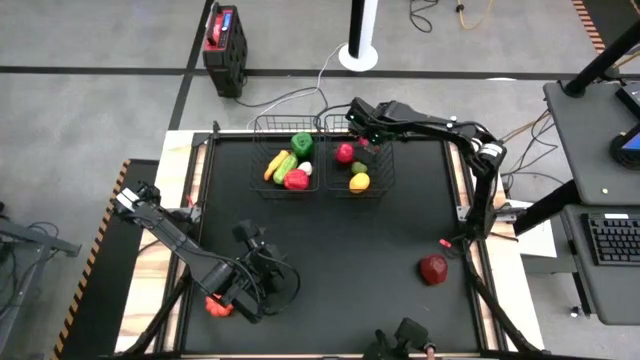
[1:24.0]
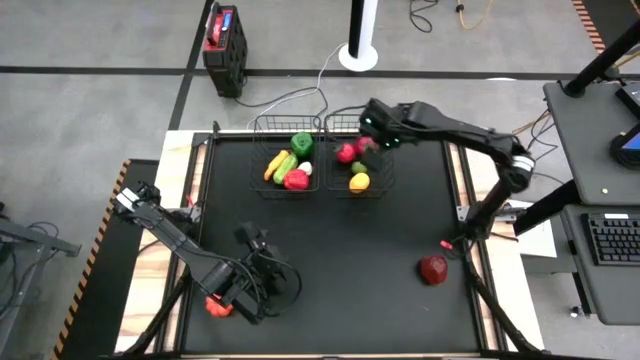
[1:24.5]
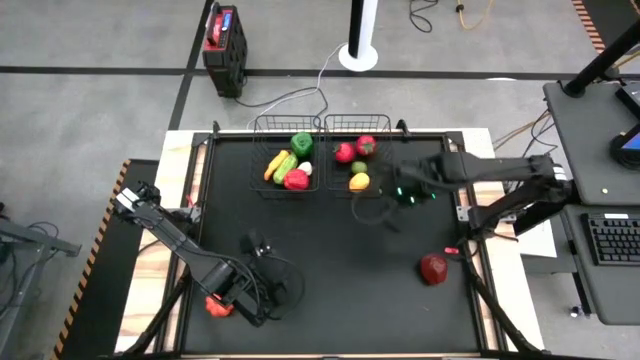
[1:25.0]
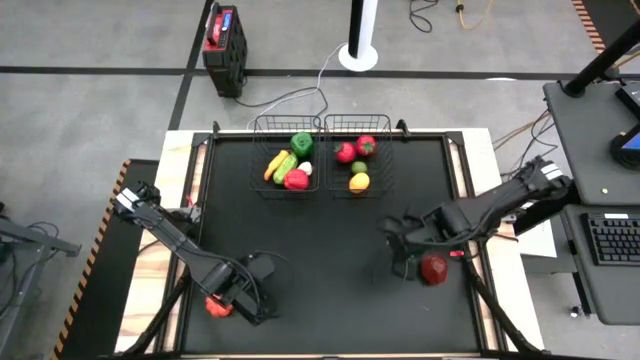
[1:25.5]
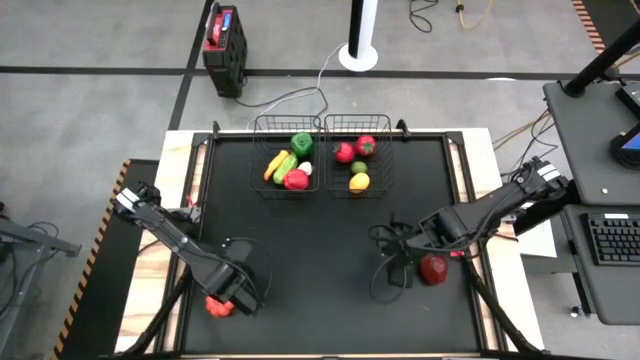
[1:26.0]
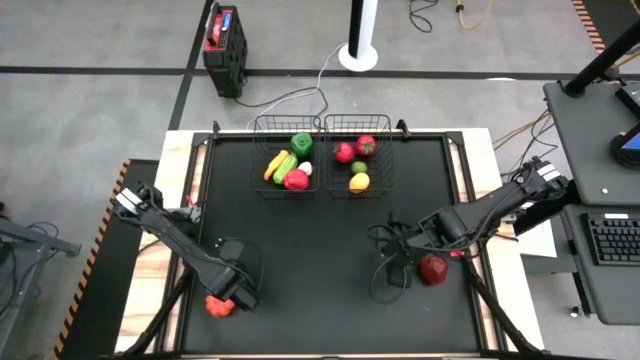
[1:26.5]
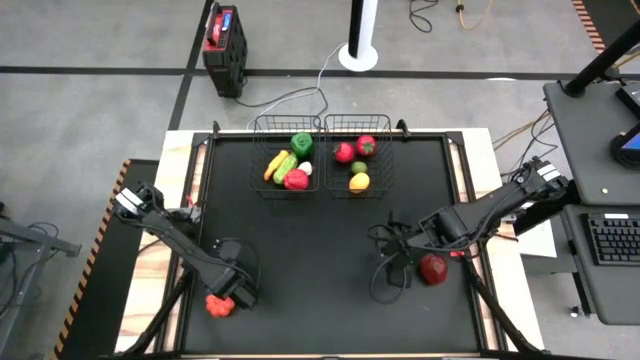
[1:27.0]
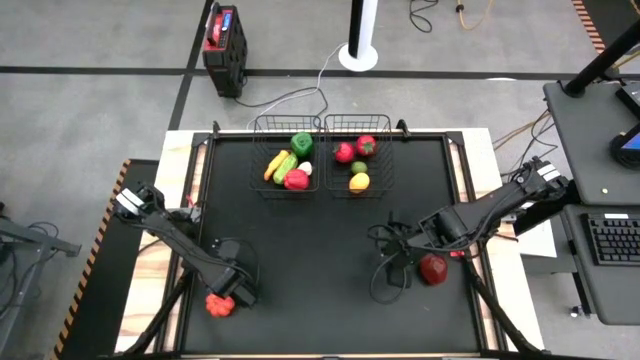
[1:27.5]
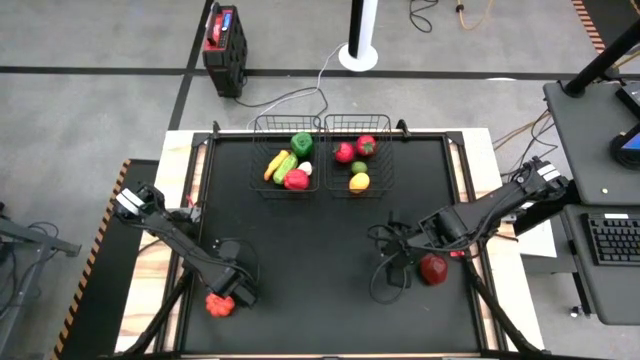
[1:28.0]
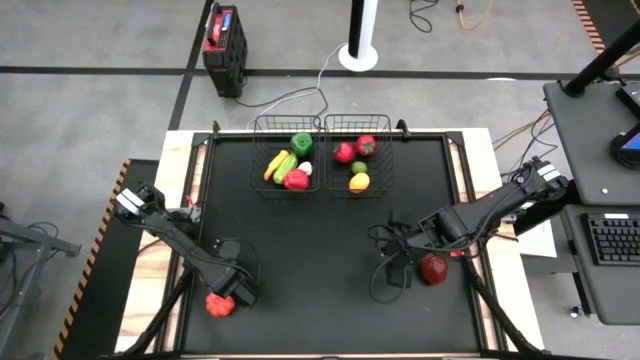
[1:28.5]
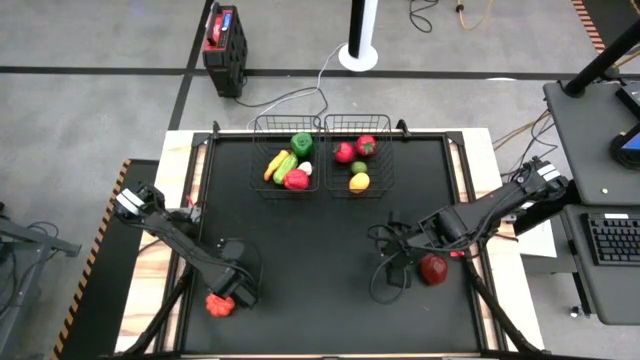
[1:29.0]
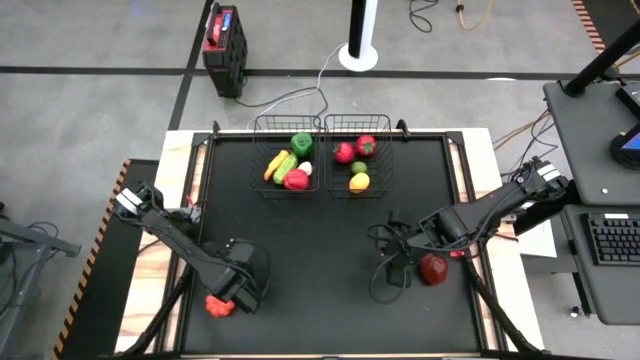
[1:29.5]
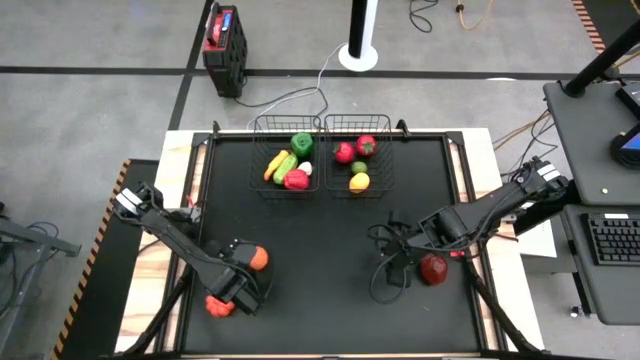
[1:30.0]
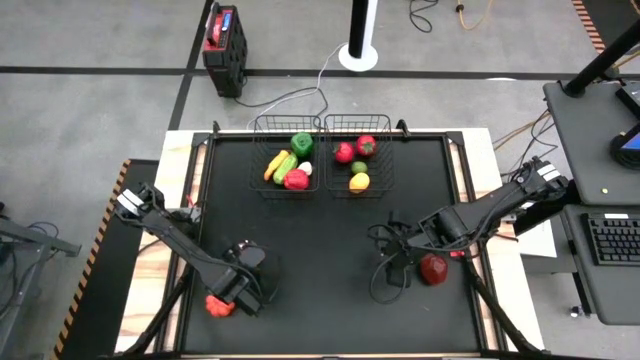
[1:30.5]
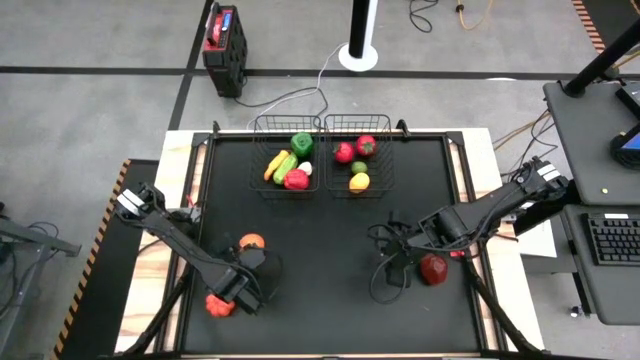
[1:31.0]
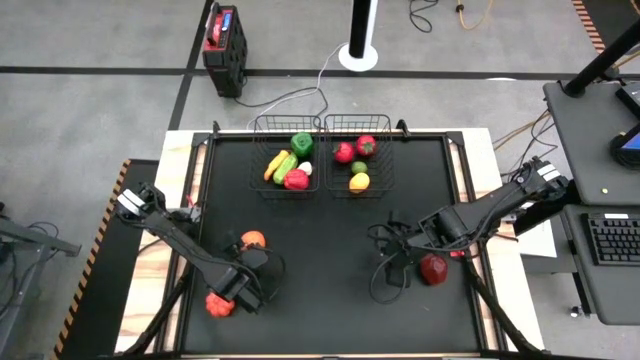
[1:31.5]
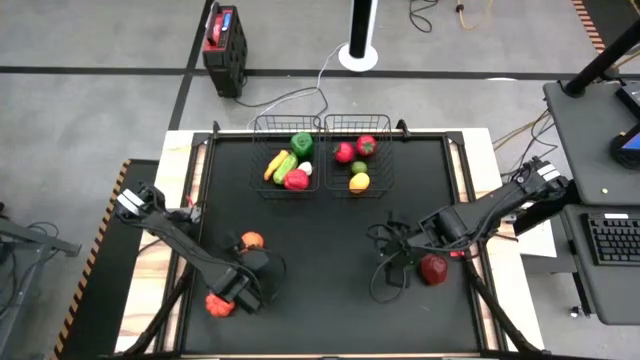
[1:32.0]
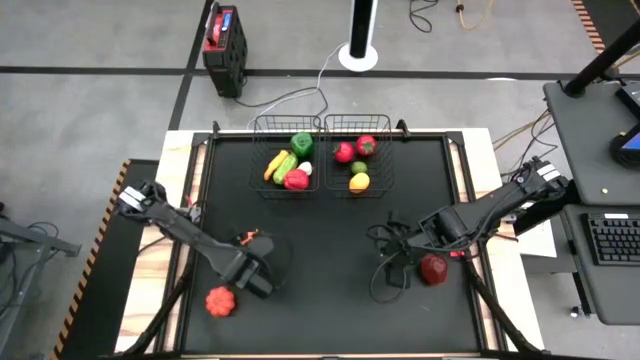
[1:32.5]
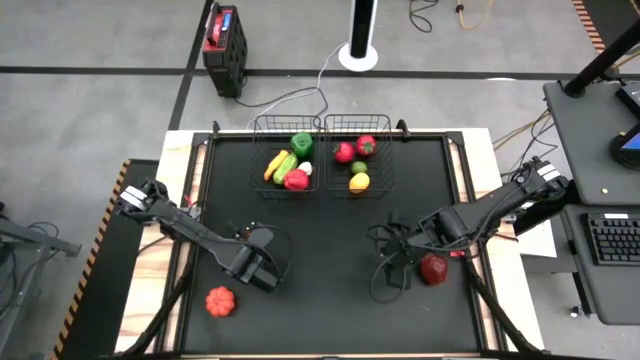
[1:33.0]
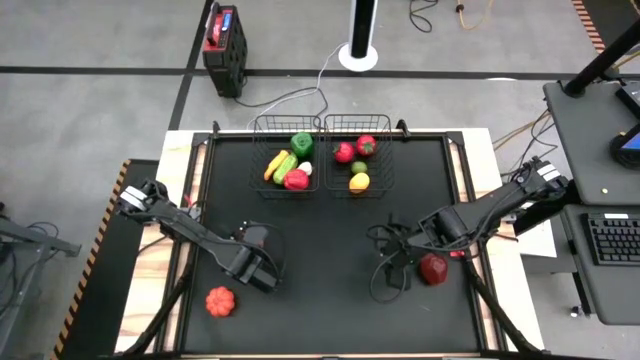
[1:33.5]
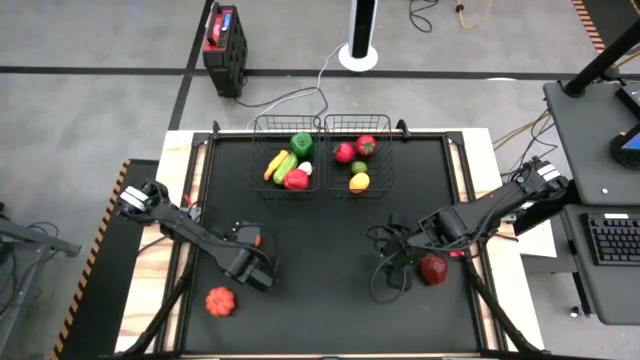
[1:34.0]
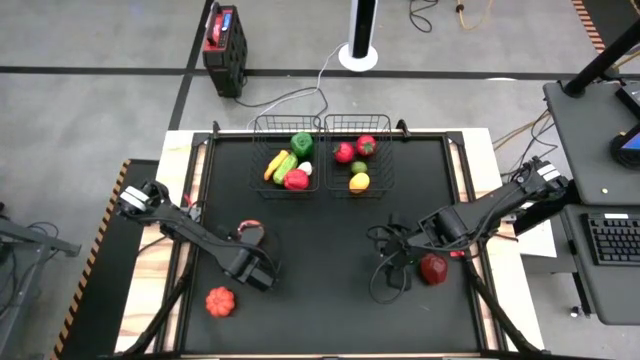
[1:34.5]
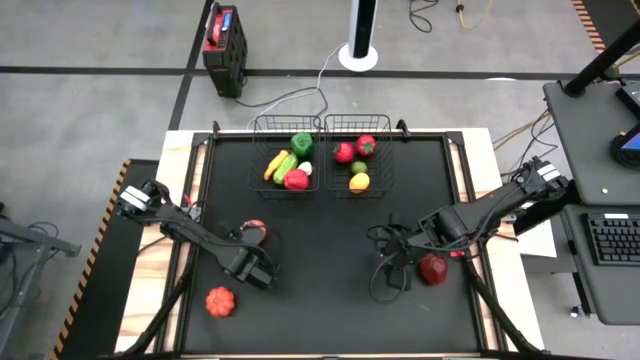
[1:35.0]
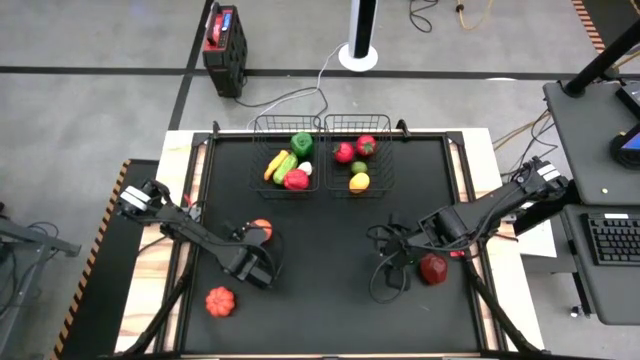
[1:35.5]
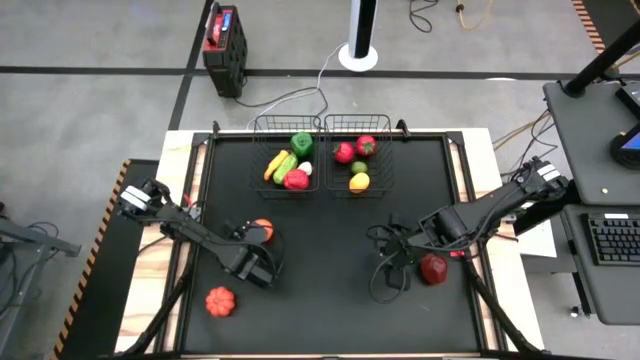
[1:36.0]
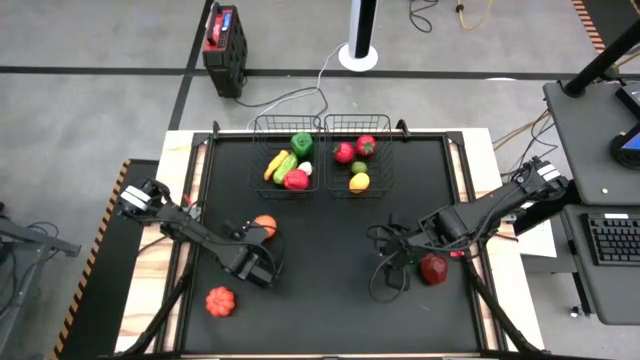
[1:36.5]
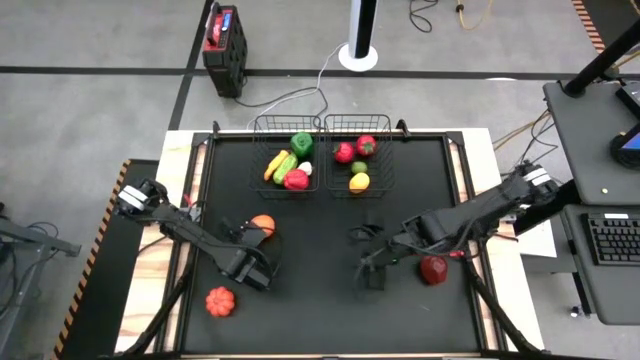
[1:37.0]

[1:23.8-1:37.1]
Task: Sort produce into baskets
Put the orange into the right wire basket

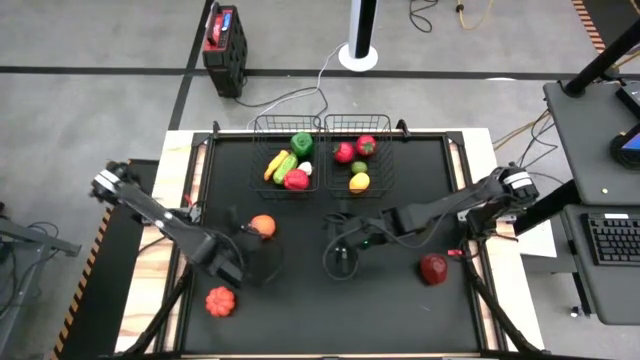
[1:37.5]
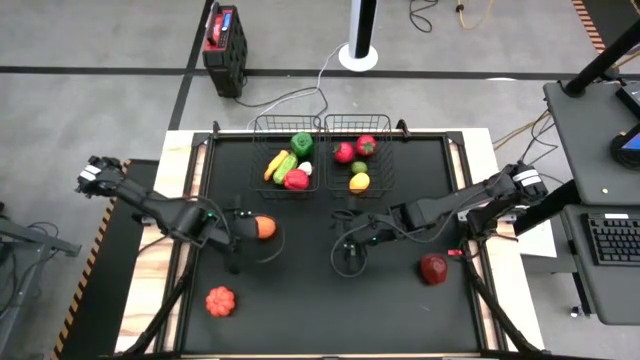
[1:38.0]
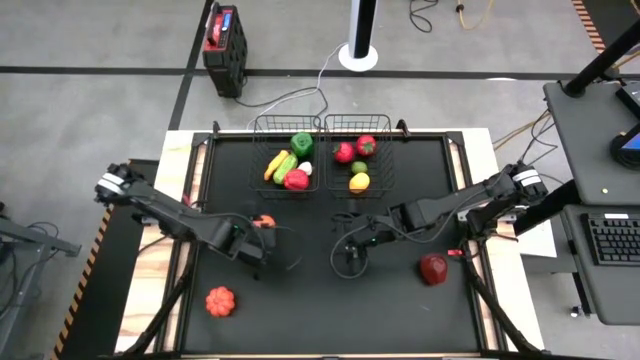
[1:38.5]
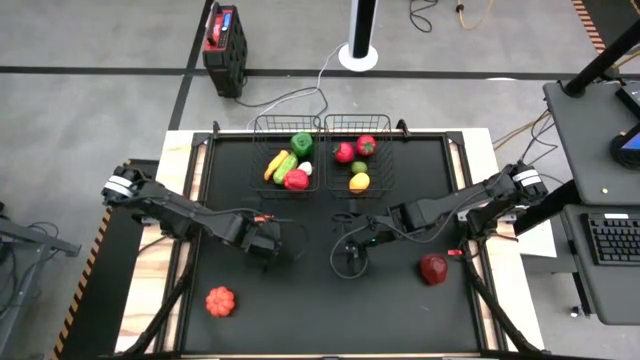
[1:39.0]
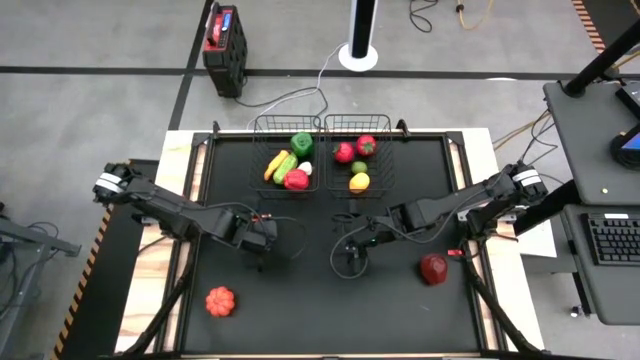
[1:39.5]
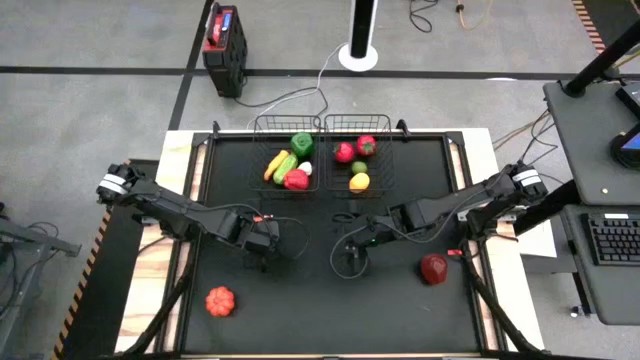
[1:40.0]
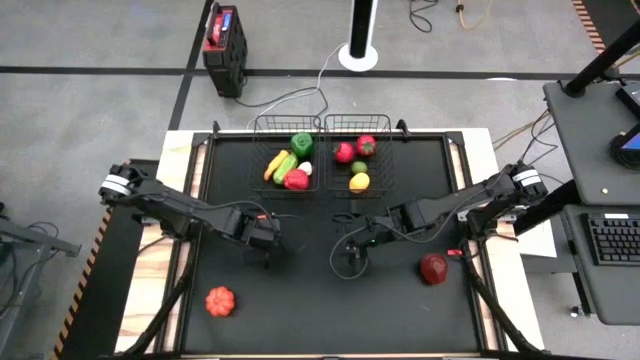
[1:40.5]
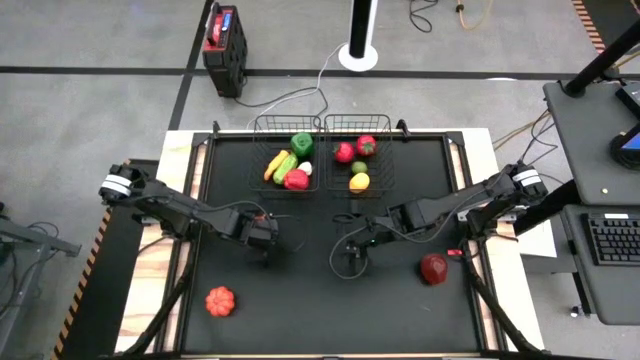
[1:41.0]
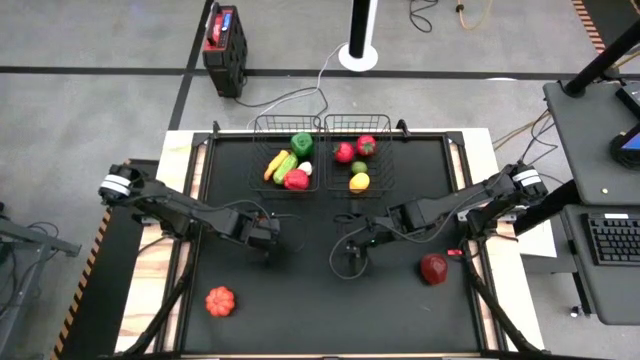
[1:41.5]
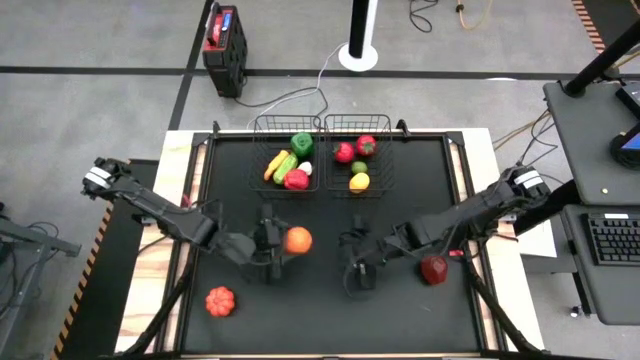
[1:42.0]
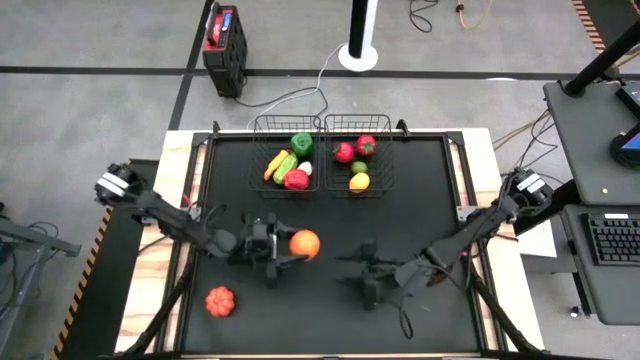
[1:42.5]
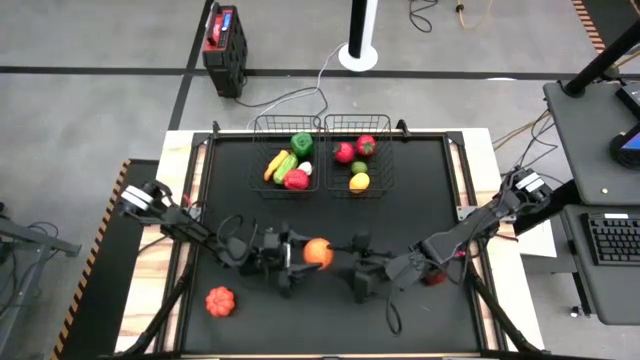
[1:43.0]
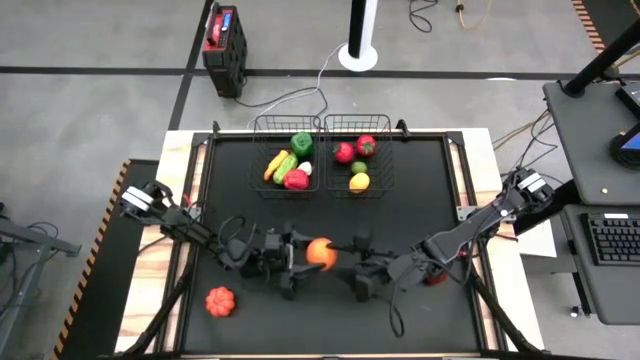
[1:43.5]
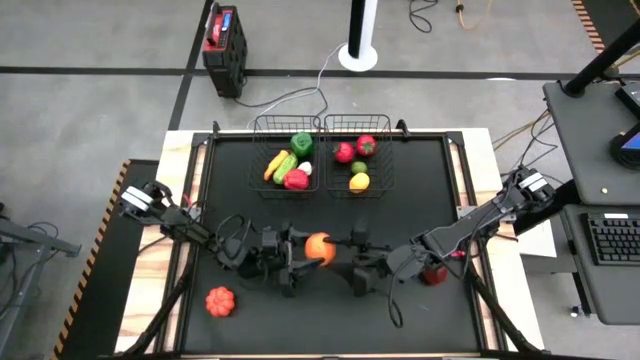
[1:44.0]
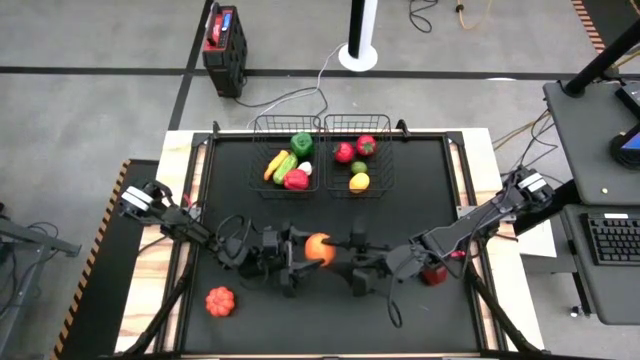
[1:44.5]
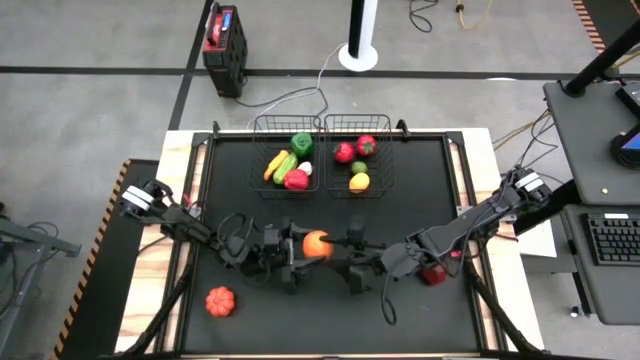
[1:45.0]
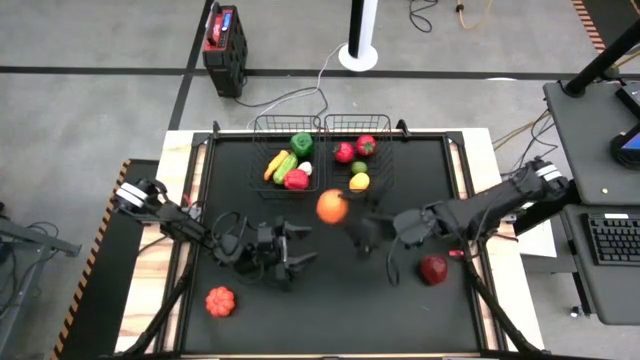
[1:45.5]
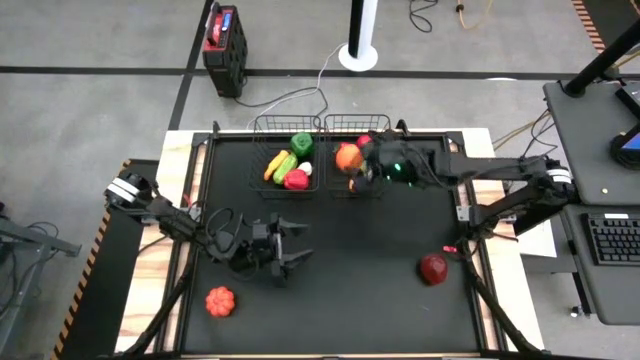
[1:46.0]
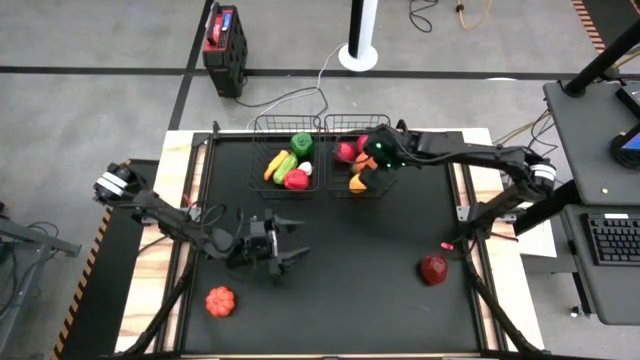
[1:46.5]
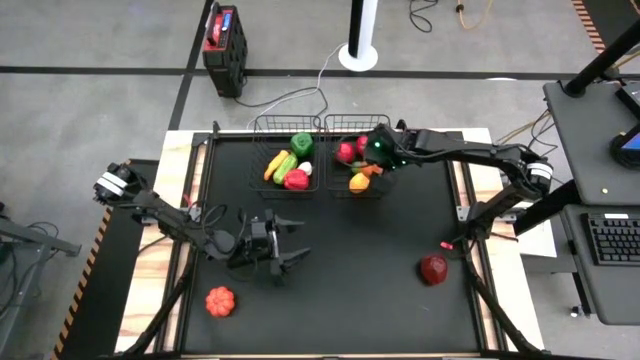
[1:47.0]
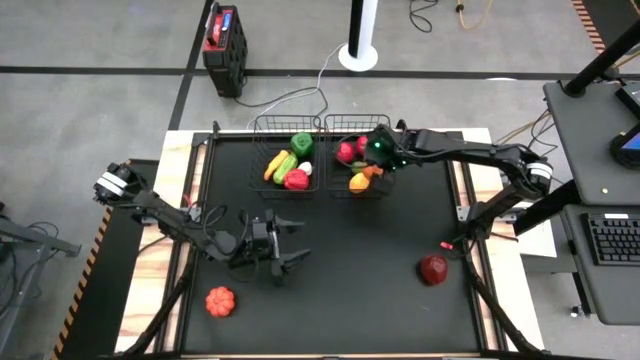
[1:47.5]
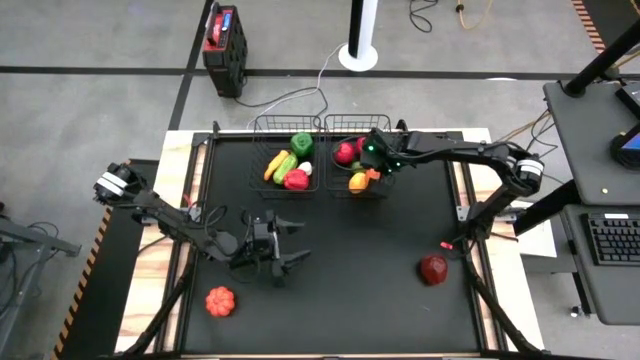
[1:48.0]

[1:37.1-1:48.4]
Put the orange into the right wire basket
